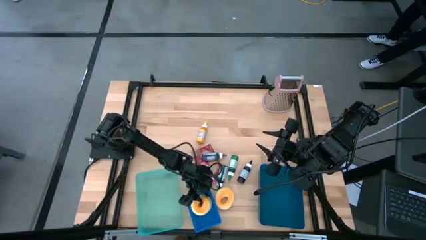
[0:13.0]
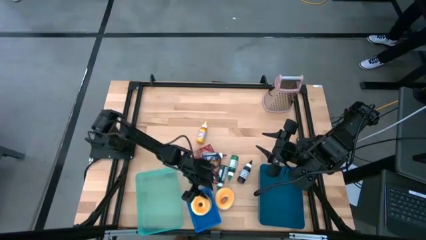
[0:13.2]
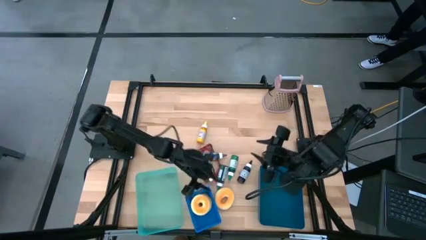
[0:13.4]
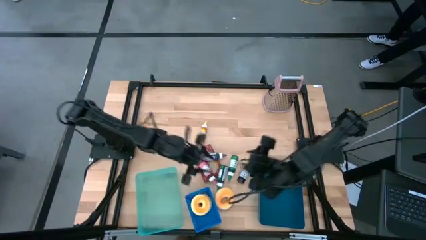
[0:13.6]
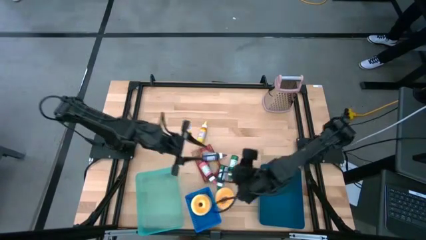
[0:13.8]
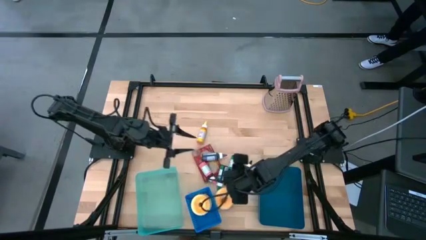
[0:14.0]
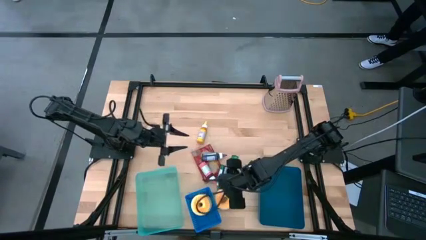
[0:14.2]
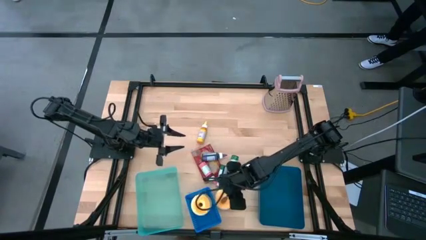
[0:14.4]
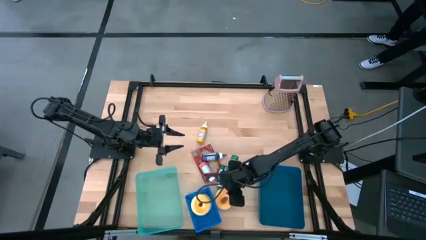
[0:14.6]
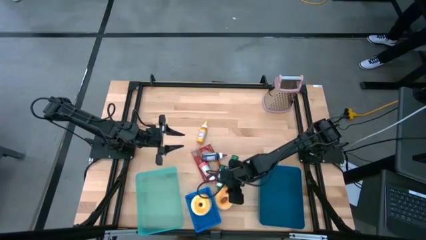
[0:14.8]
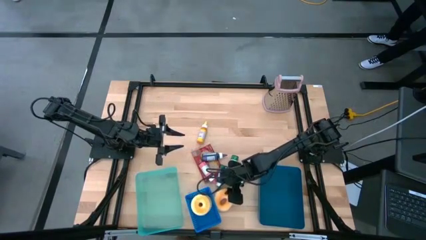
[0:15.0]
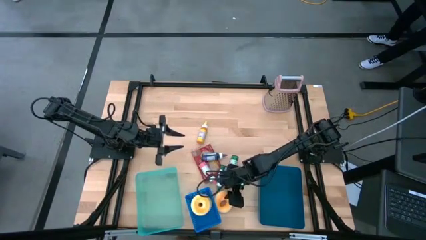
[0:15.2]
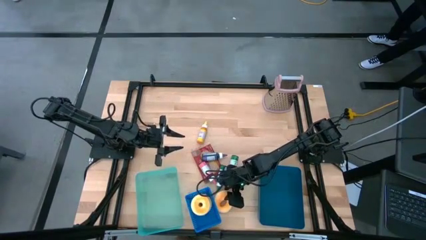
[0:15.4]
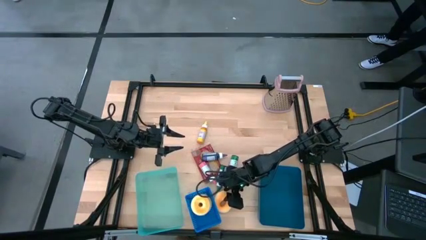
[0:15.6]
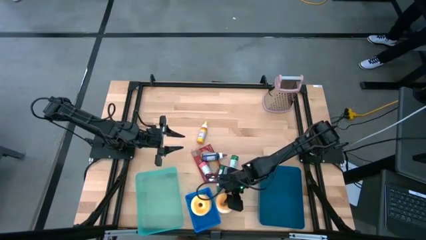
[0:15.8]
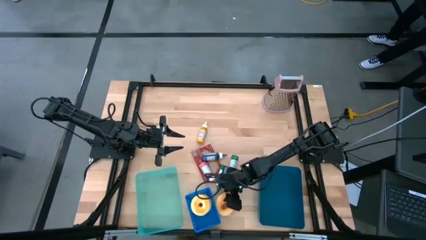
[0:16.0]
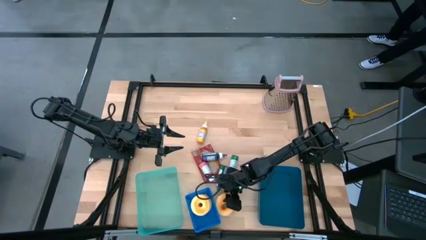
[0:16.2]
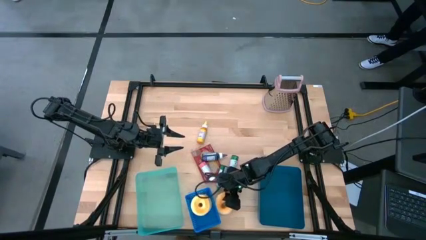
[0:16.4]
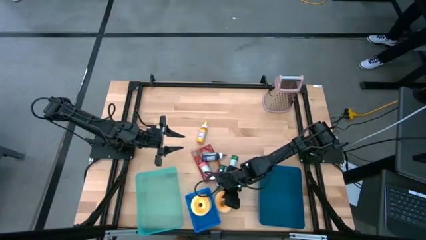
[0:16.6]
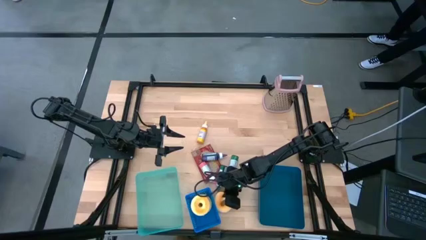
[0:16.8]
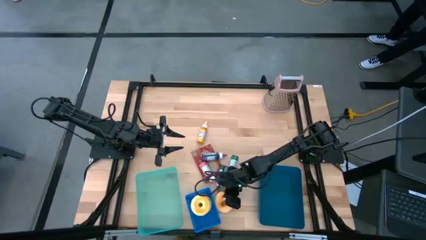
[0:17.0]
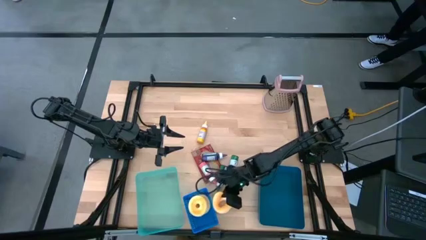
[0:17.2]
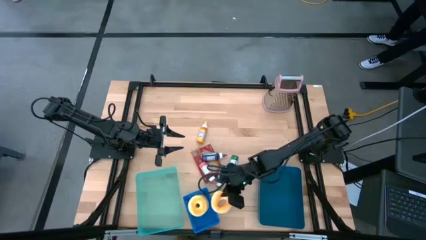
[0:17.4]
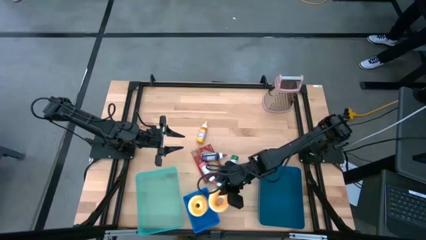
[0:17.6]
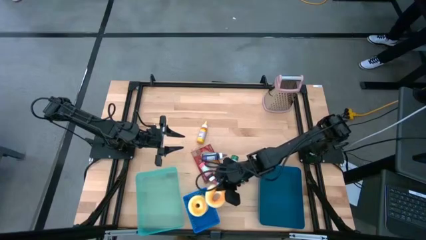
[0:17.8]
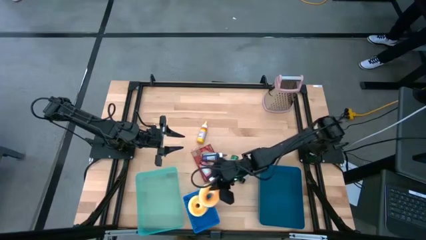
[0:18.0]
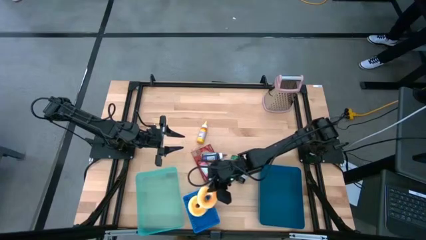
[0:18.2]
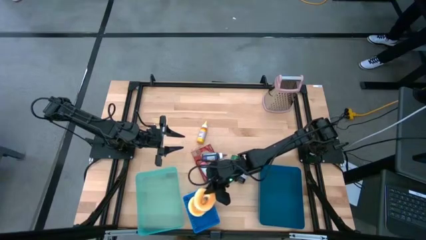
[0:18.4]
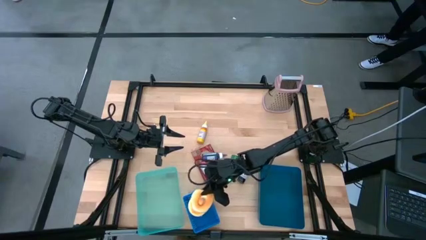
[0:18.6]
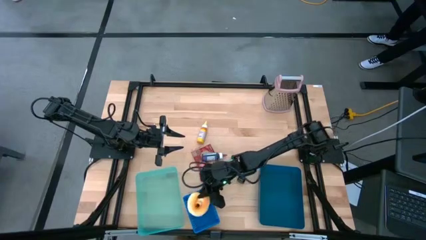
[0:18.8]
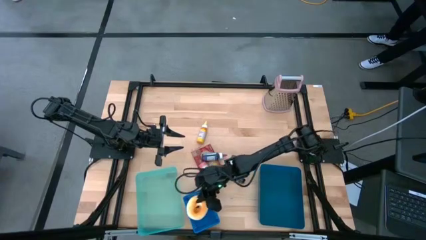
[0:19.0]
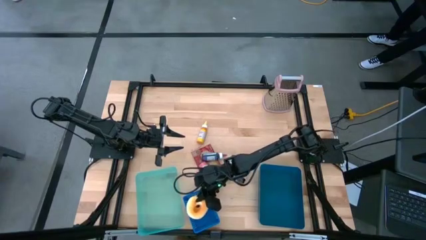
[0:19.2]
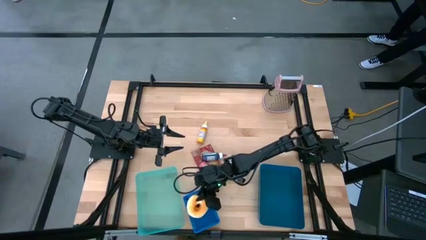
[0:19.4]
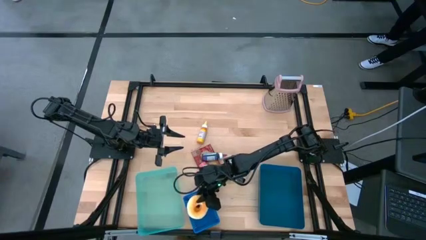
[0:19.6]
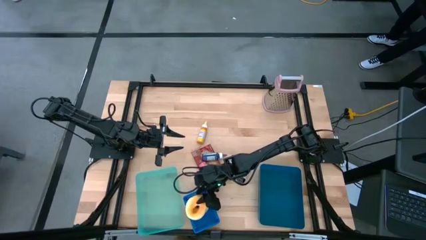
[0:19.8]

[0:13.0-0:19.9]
Put the donut into the blue bin

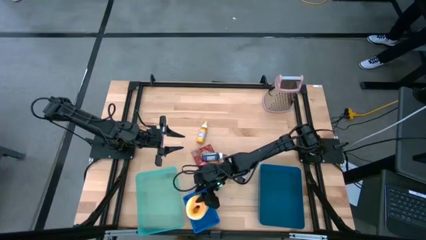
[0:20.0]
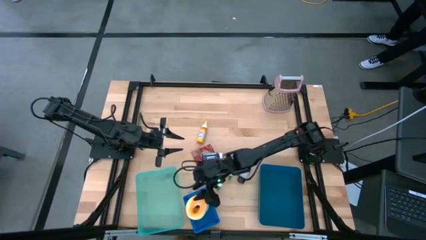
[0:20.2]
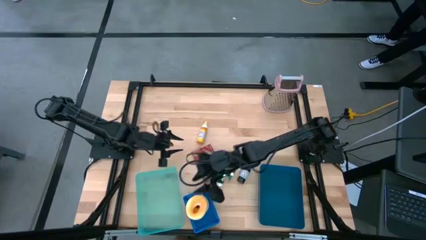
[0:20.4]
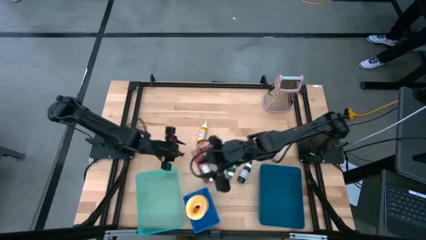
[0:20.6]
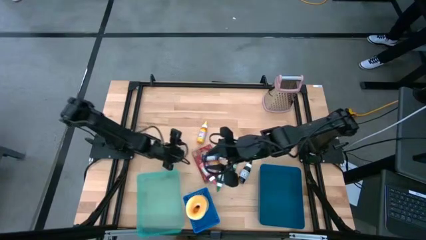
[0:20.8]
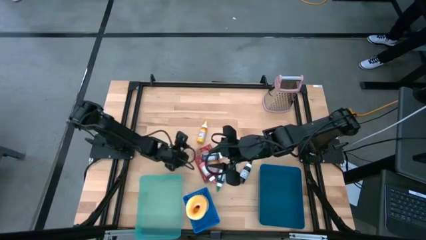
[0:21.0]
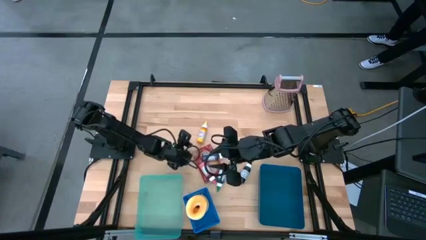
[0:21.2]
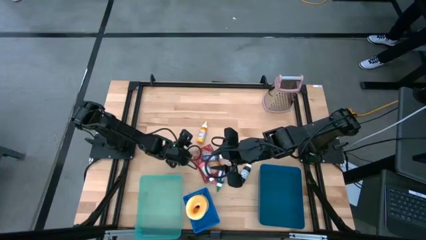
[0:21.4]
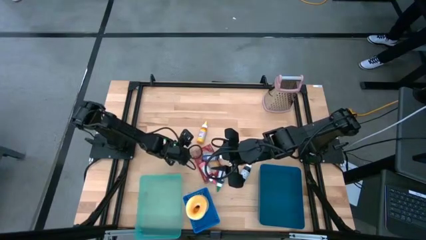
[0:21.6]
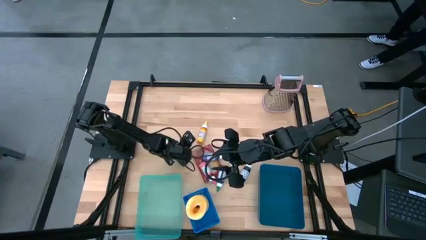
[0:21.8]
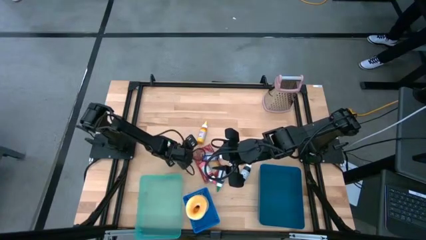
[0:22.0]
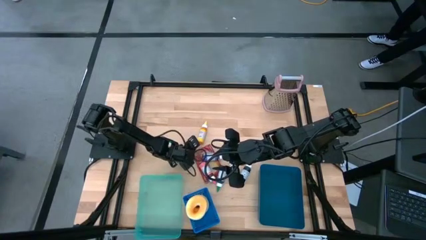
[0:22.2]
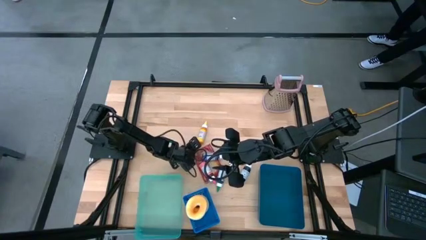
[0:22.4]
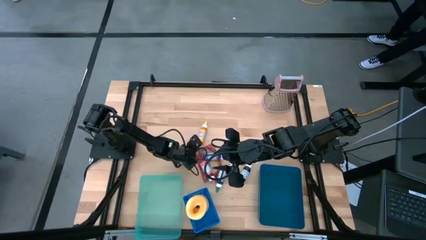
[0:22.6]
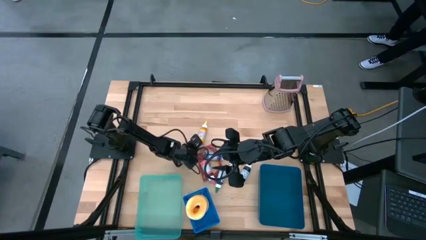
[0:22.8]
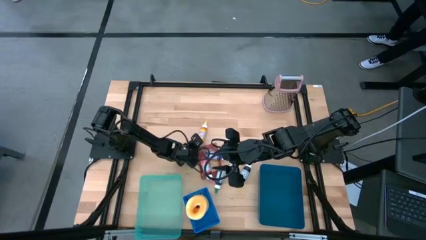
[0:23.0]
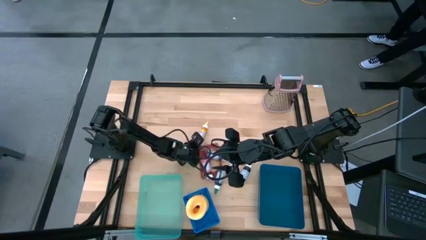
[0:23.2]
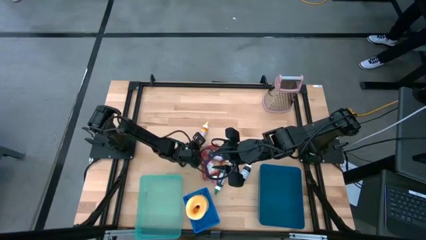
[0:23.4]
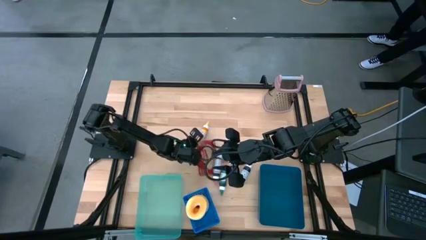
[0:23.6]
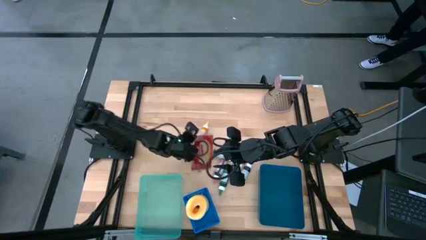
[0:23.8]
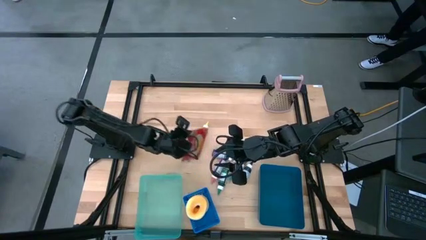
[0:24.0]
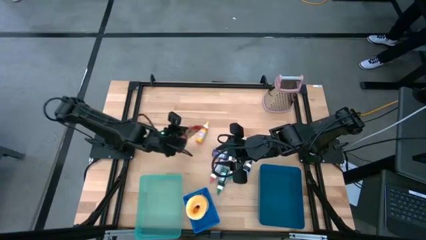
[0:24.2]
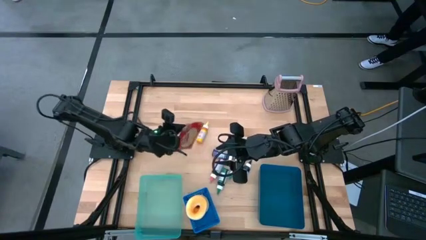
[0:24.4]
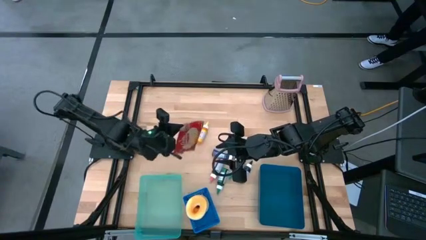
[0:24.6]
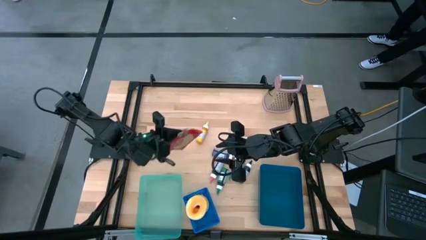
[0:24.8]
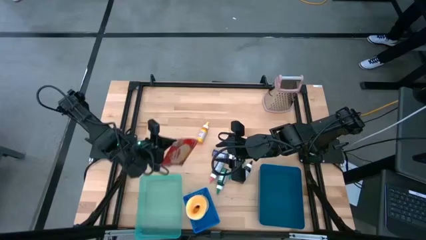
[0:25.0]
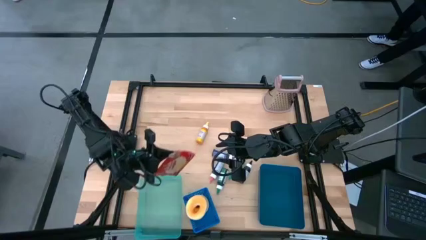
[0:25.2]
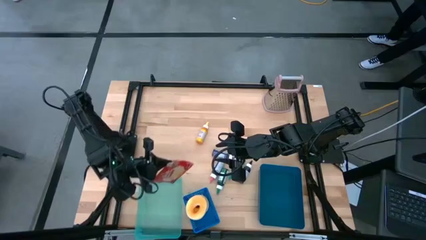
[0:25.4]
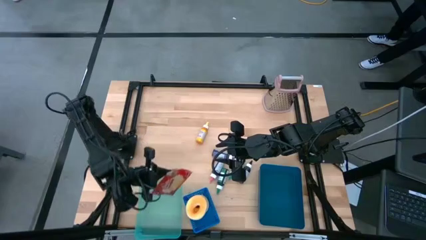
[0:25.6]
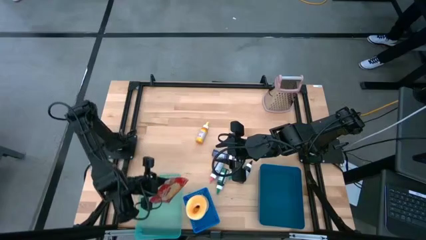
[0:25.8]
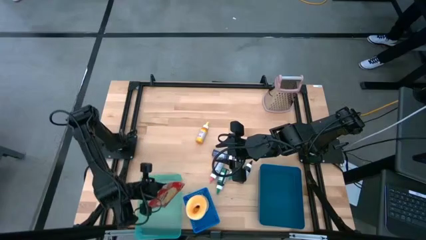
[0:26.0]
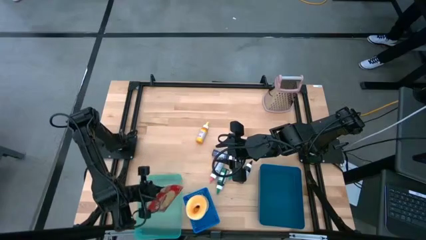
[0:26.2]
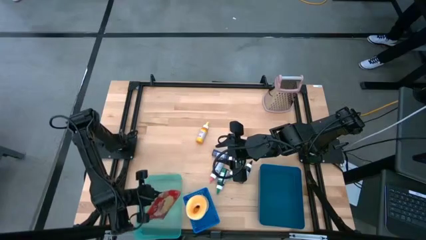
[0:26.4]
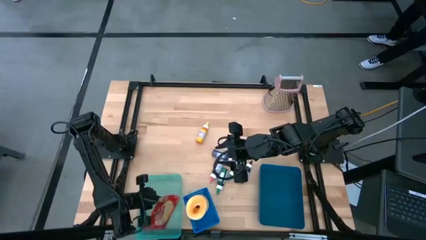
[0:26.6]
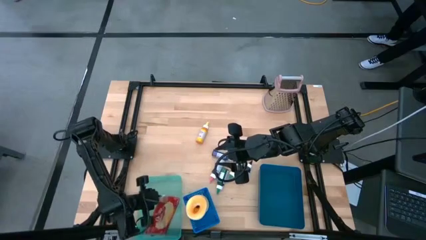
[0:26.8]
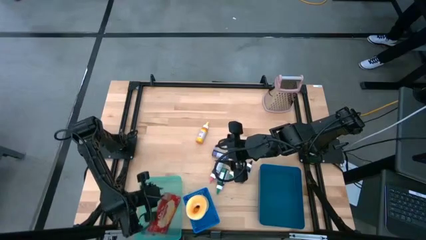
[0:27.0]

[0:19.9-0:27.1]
Put the red popcorn bag into the green bin

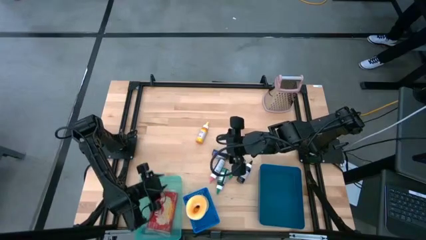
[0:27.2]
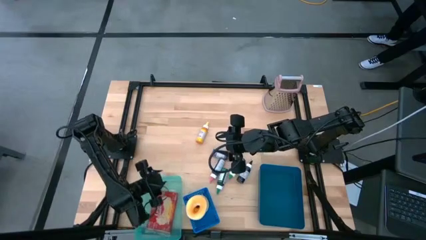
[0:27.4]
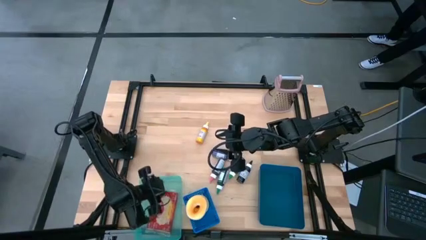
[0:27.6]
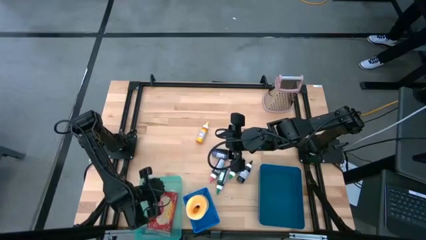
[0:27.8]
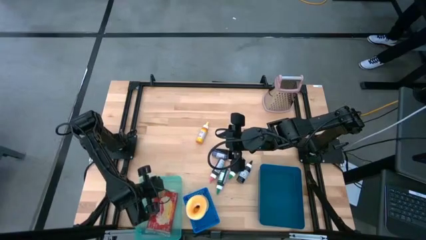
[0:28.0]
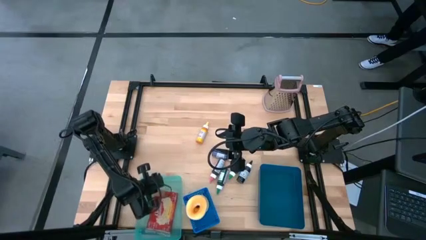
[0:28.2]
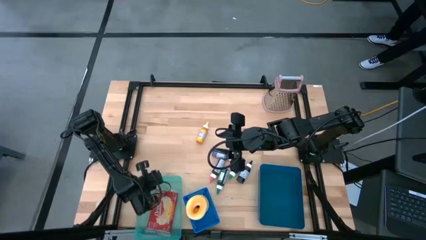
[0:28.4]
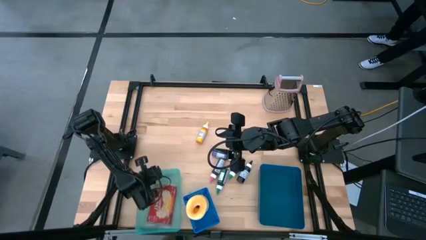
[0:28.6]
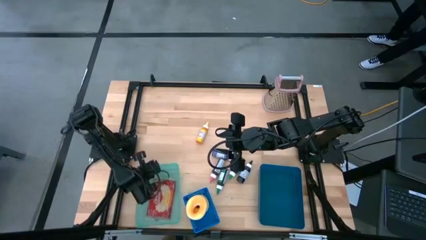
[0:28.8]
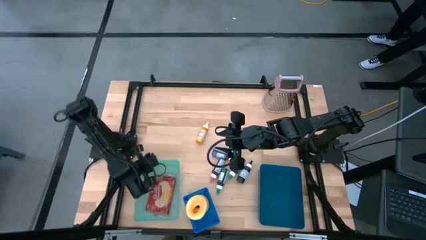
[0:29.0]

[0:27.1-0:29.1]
Adjust the blue bin
